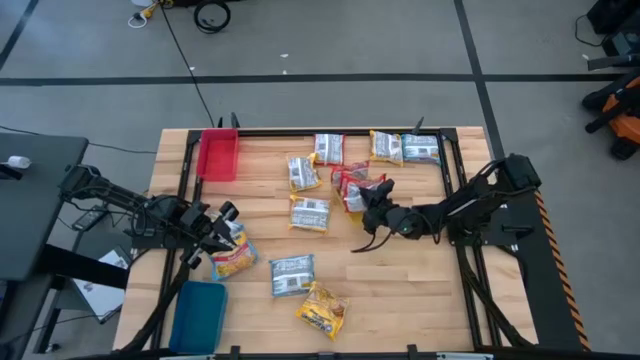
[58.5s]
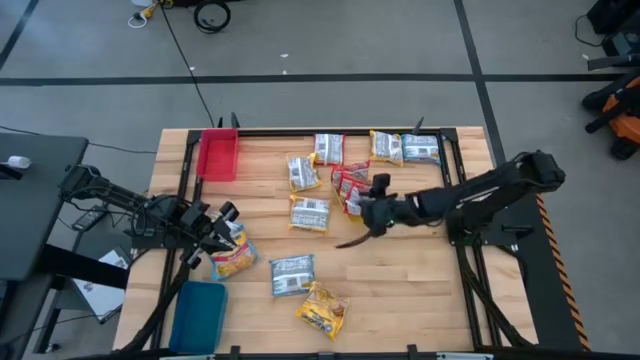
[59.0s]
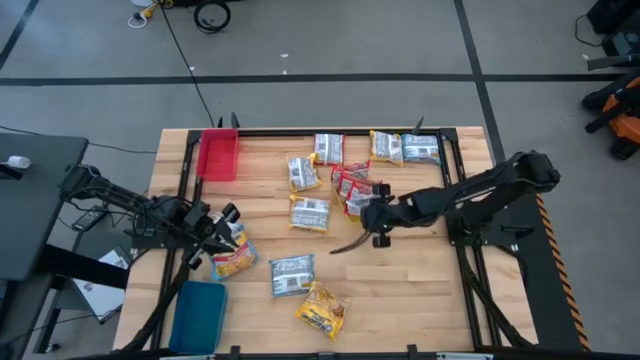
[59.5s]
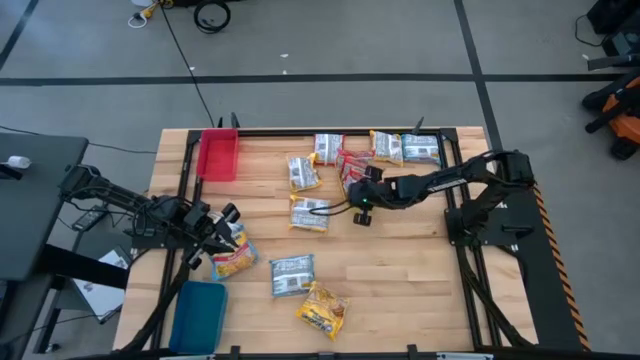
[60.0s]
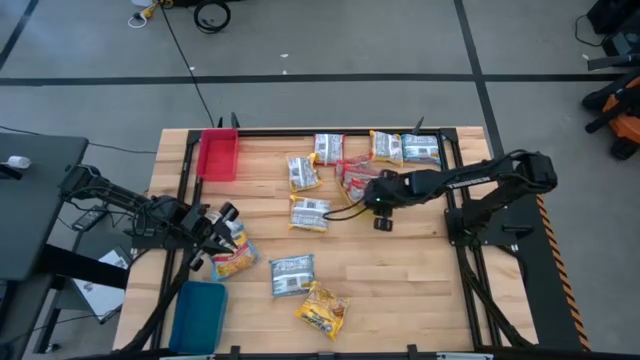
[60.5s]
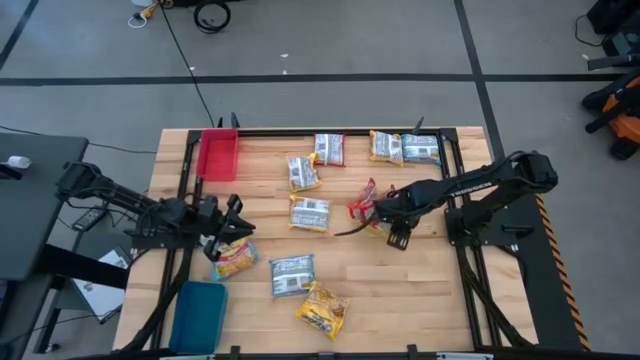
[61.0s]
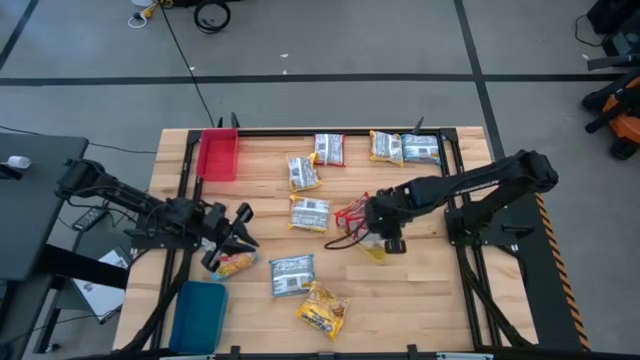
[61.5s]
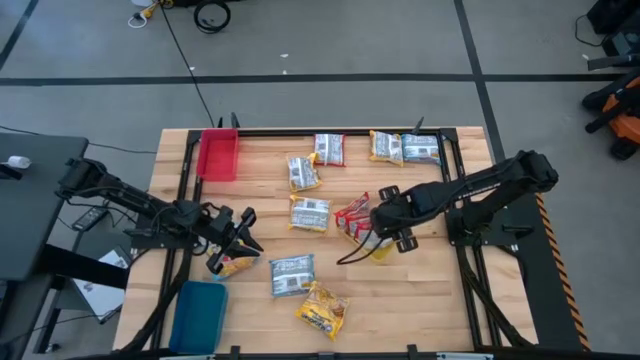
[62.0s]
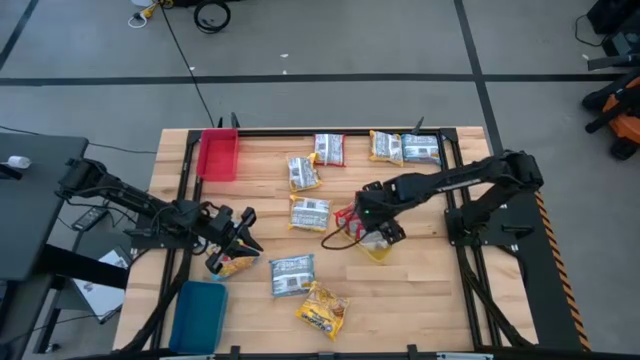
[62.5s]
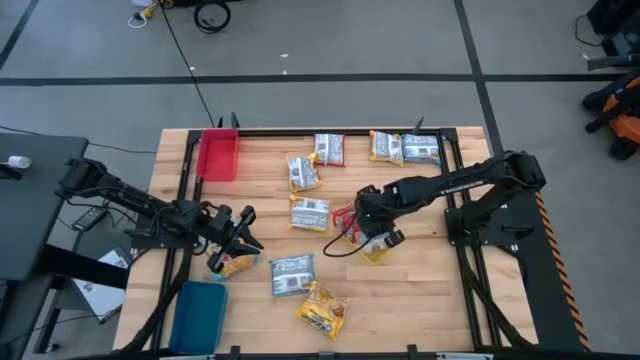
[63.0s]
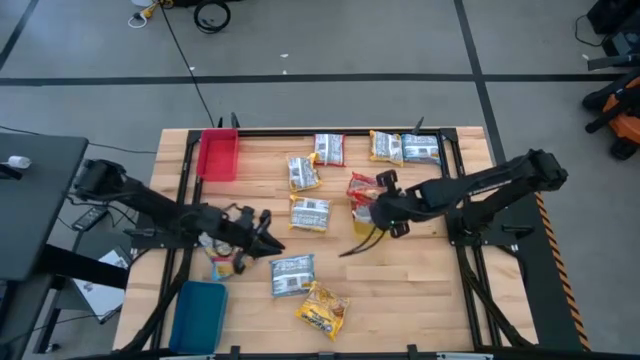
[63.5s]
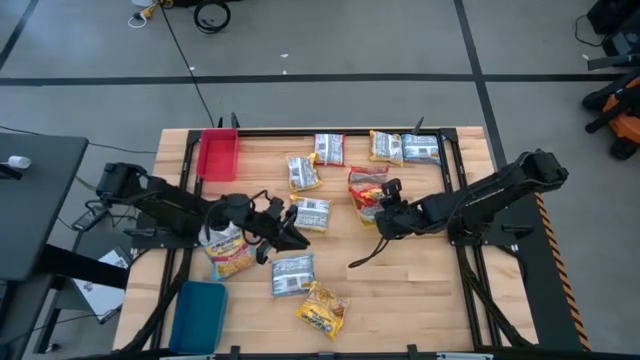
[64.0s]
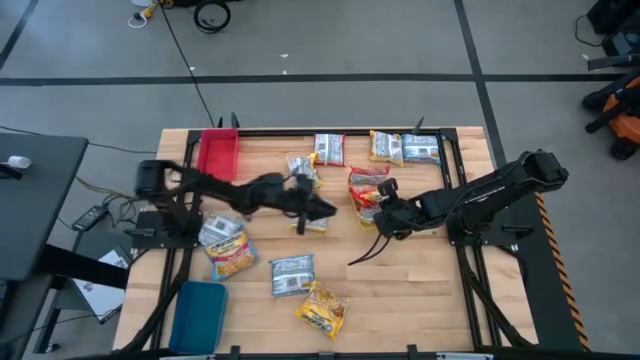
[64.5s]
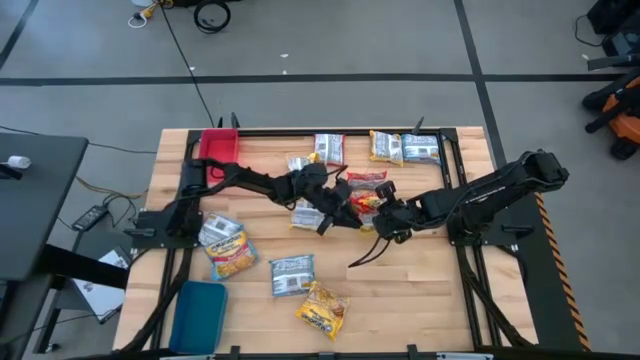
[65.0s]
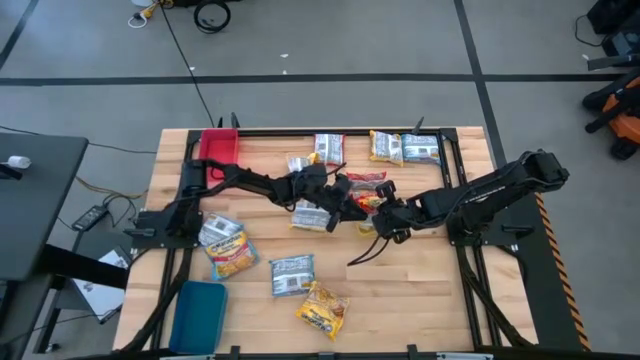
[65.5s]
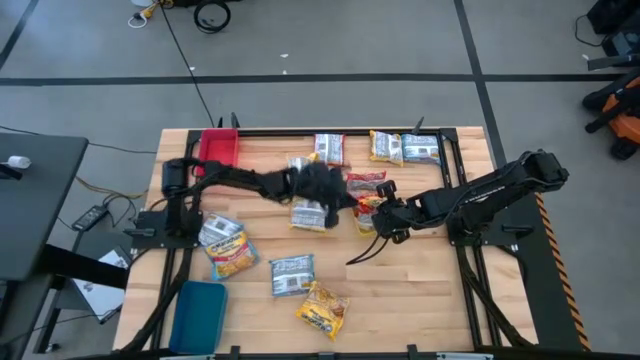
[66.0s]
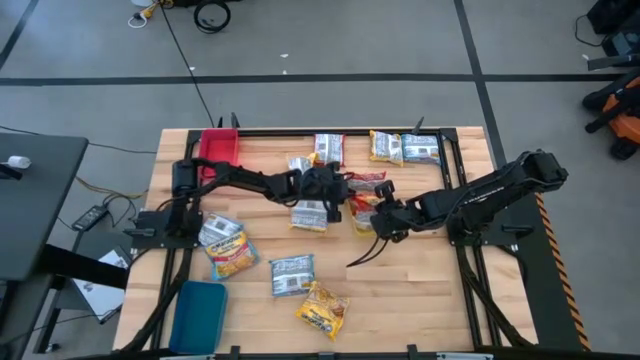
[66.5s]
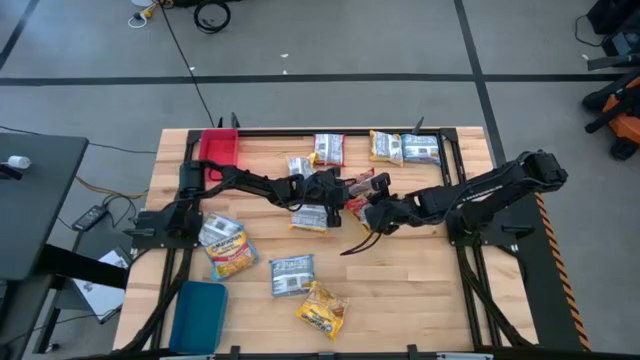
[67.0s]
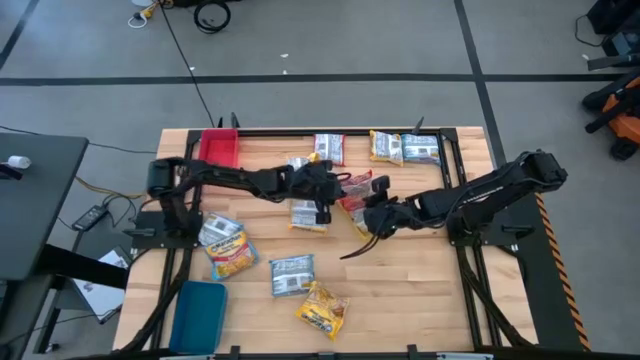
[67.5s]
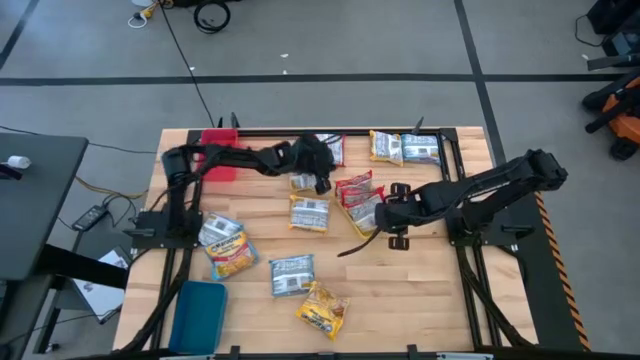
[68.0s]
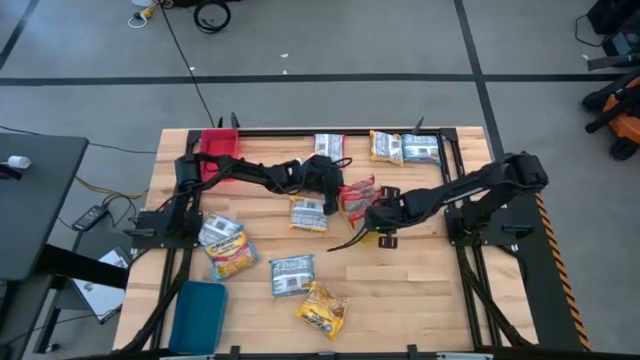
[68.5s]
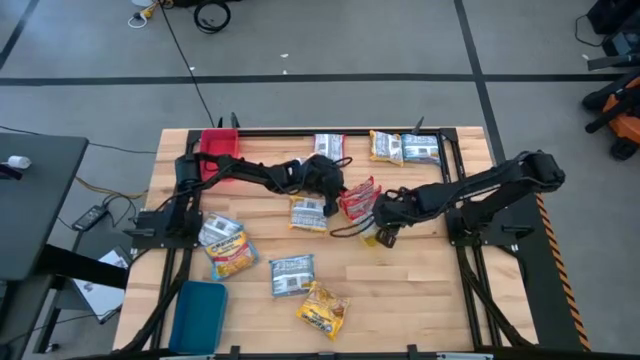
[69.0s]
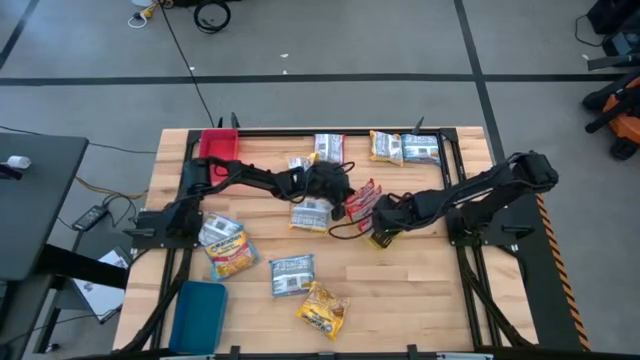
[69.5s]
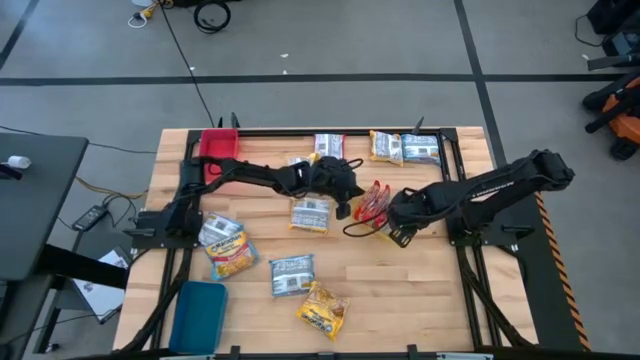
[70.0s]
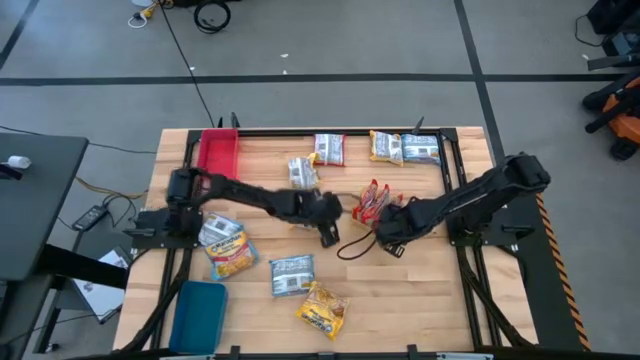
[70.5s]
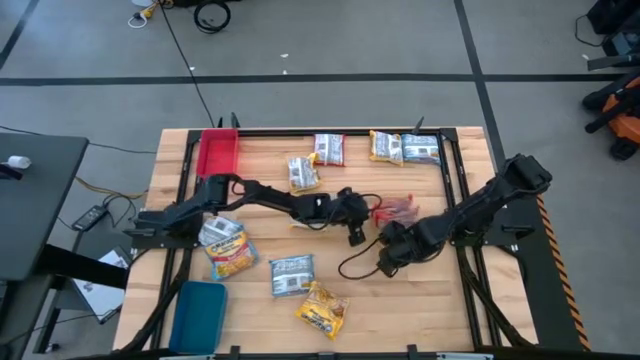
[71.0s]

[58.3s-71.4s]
Task: Sort Maruchan noodles
Adjust the red noodle packs in the yellow bin

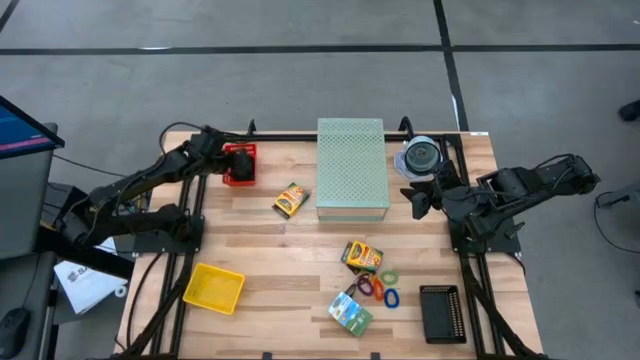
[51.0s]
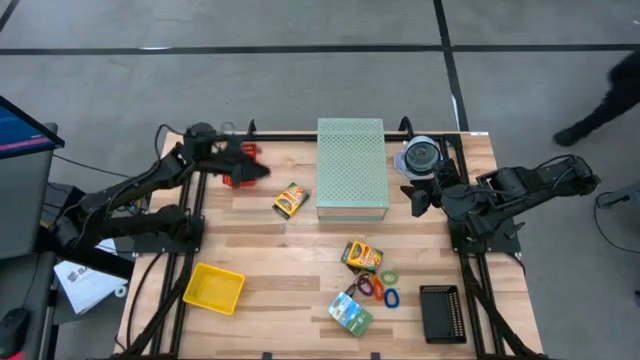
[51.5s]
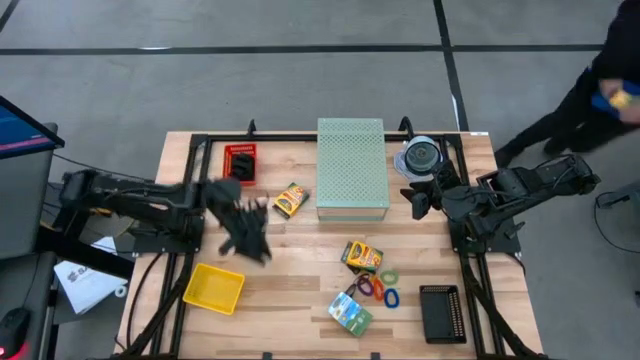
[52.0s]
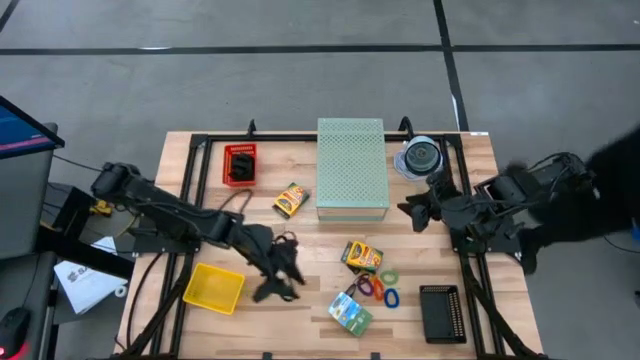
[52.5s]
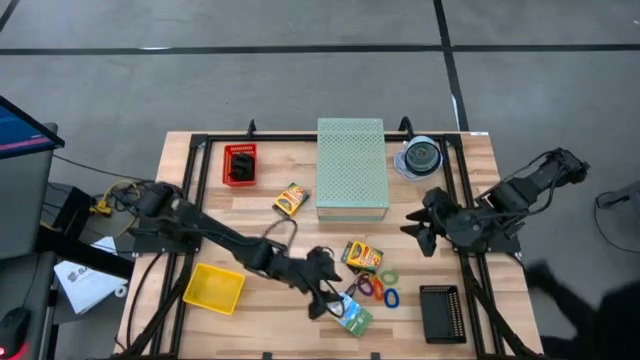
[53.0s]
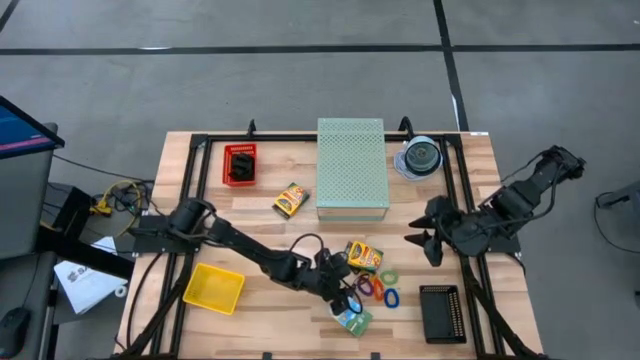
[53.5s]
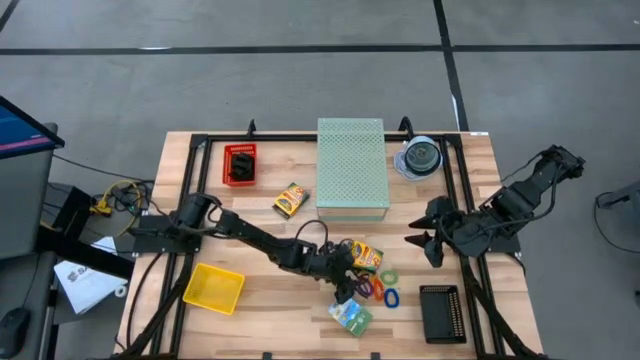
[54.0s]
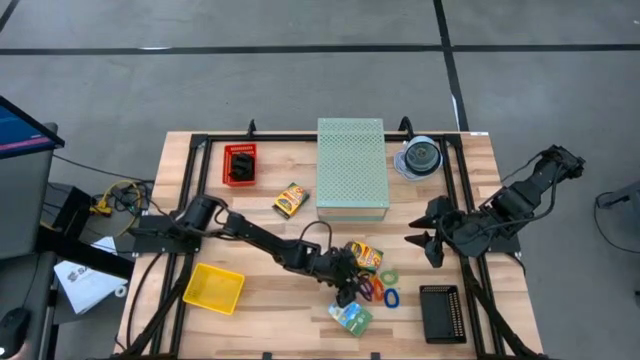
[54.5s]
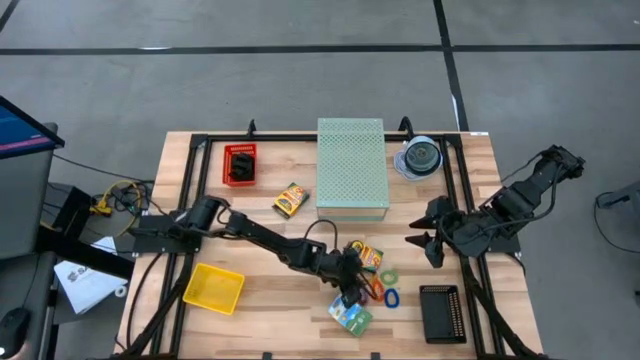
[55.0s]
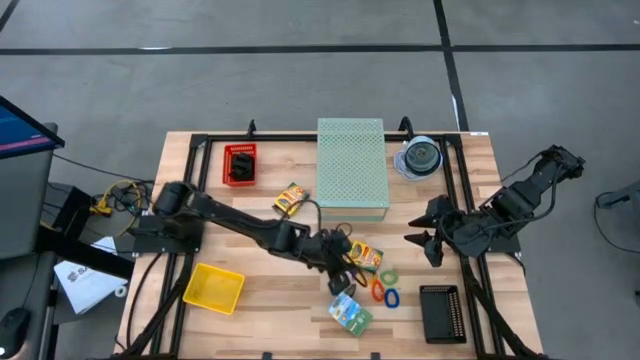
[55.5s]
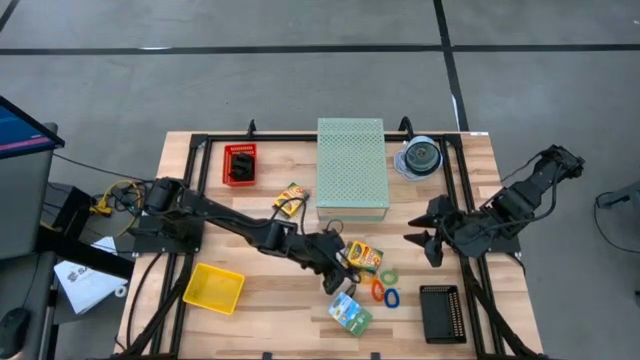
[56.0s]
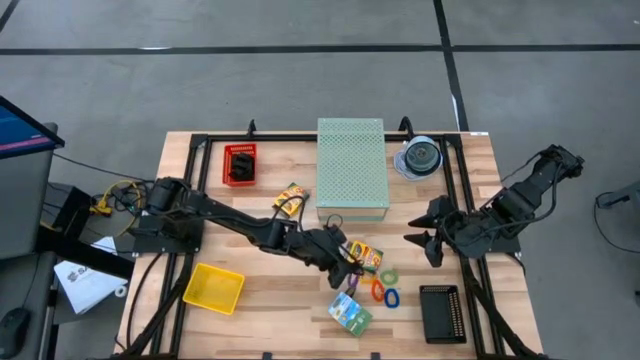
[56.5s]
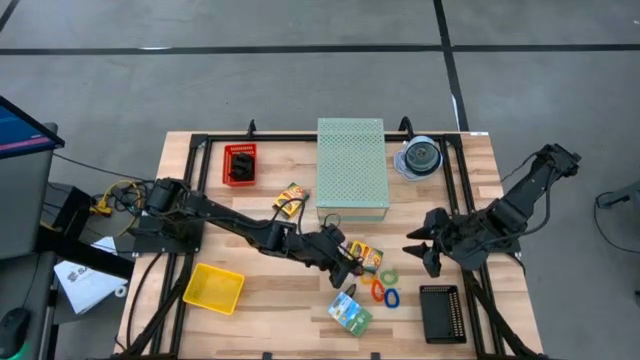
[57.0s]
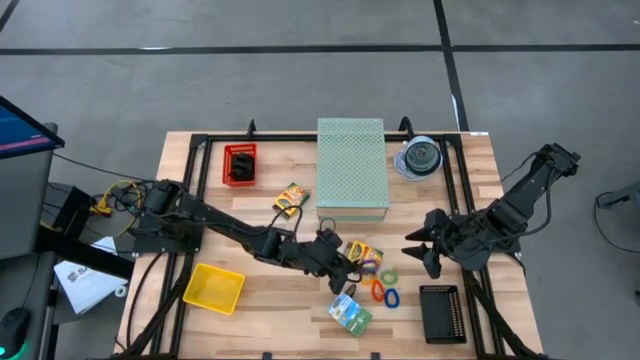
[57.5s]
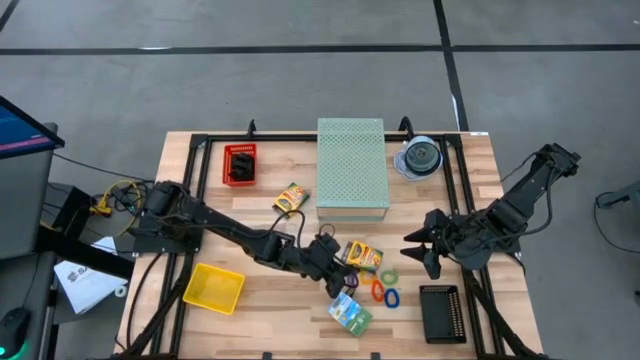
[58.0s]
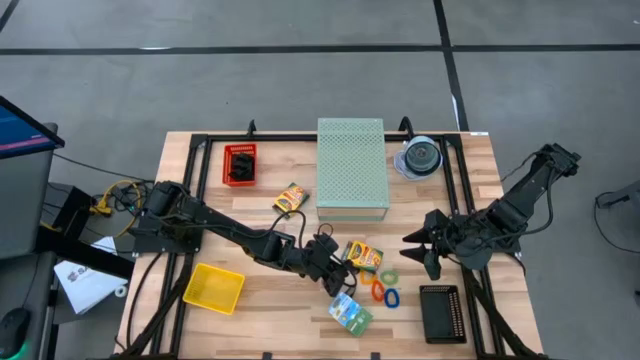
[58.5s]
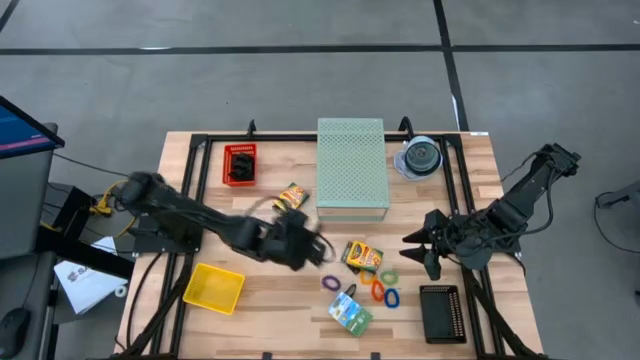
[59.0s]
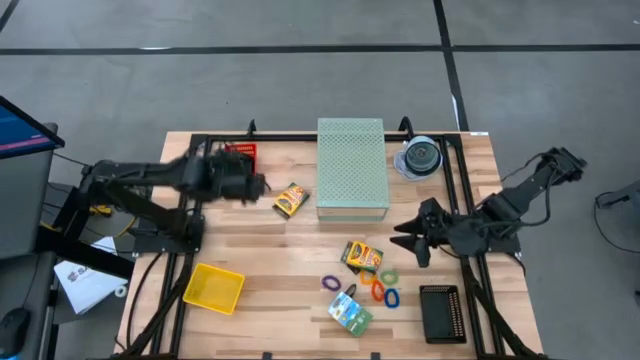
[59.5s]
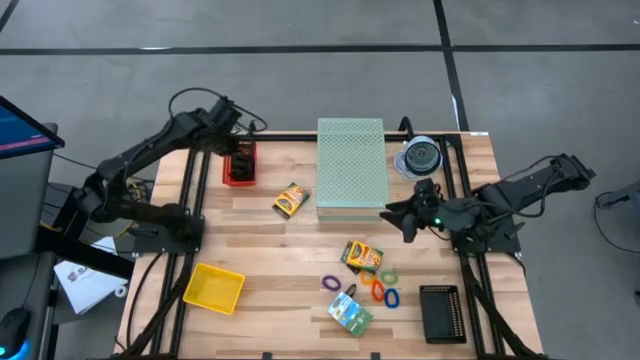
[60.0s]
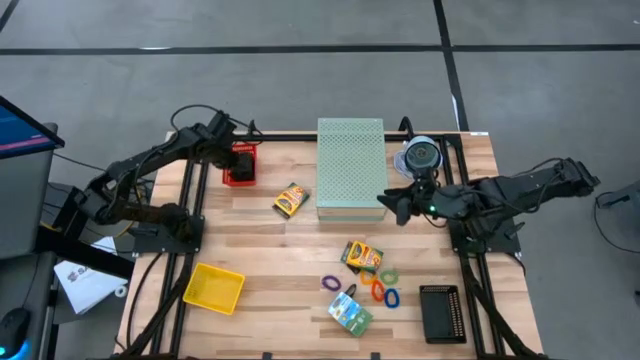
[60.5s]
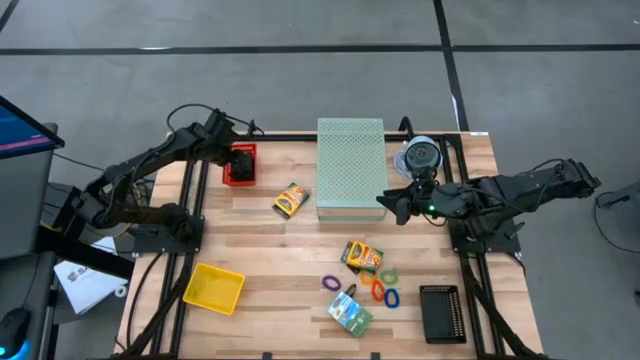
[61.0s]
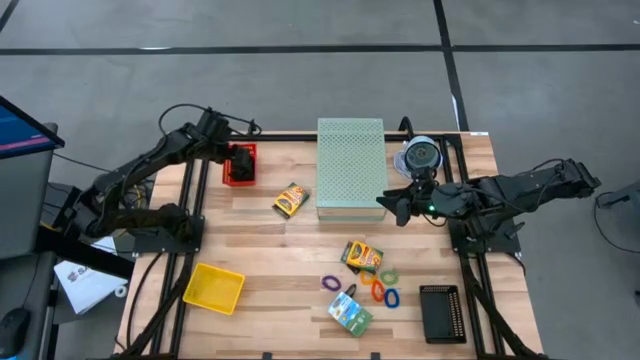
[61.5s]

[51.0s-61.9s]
Task: Pick & Place Office Desk Supplies
Put the black rubber band into the red bin
